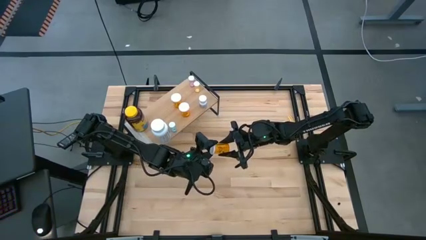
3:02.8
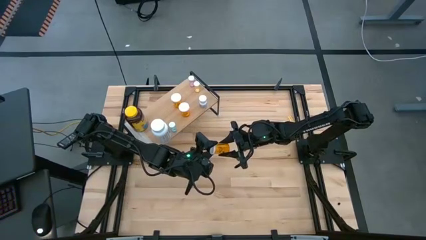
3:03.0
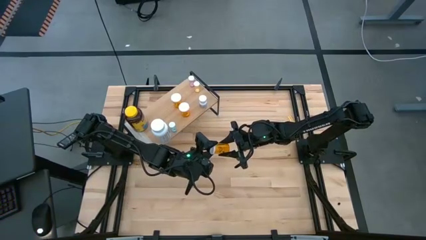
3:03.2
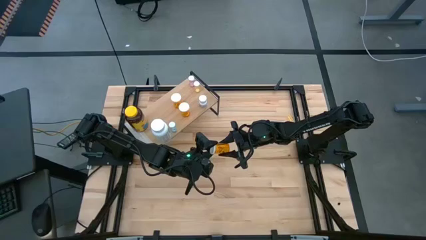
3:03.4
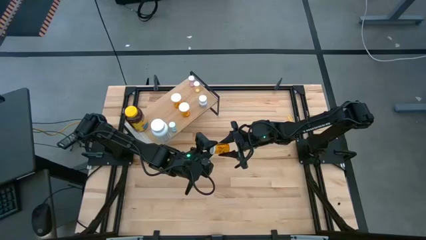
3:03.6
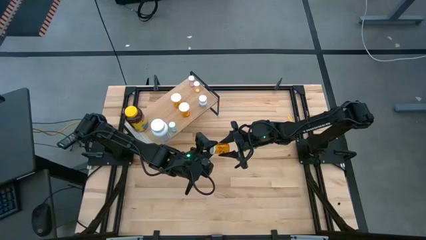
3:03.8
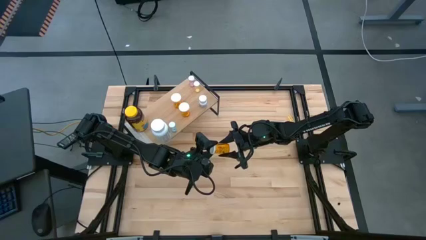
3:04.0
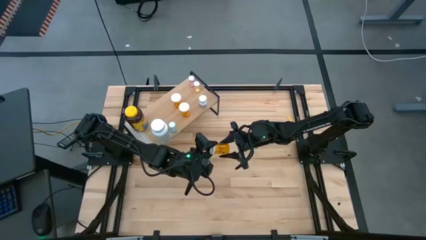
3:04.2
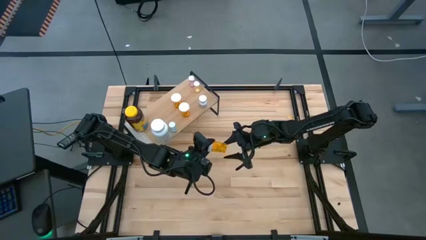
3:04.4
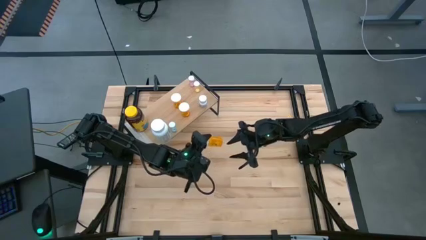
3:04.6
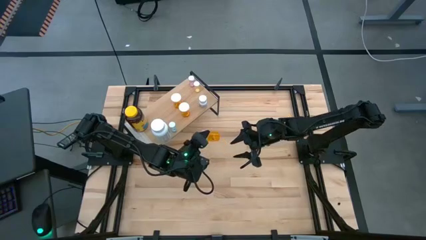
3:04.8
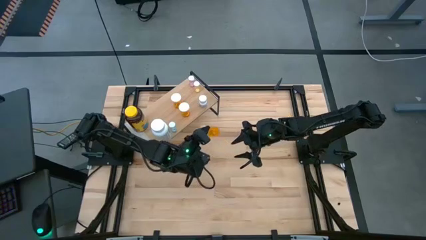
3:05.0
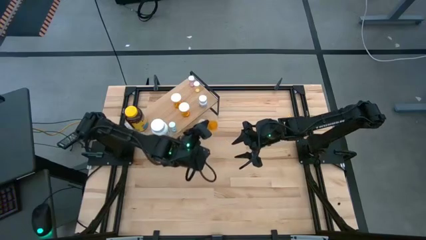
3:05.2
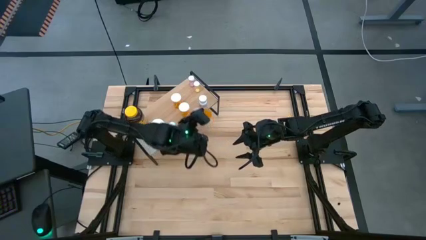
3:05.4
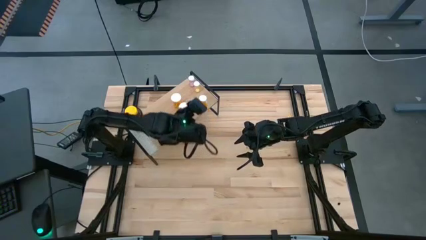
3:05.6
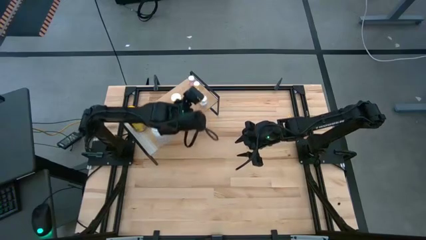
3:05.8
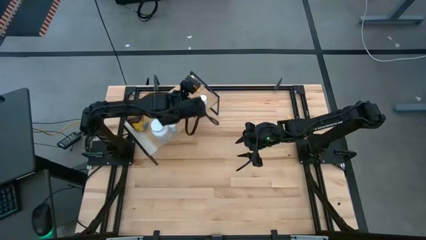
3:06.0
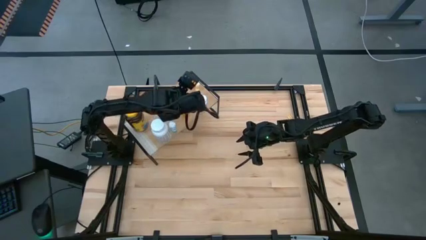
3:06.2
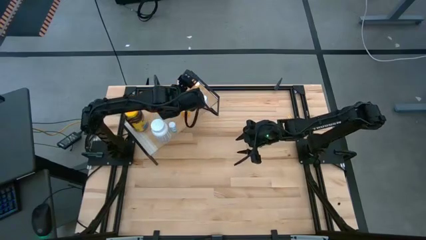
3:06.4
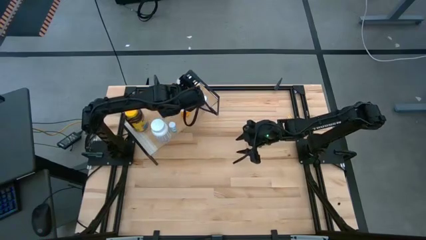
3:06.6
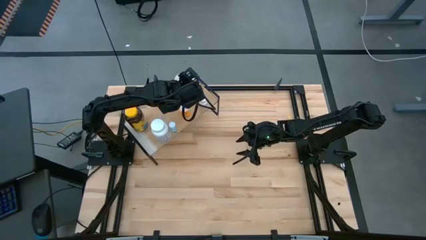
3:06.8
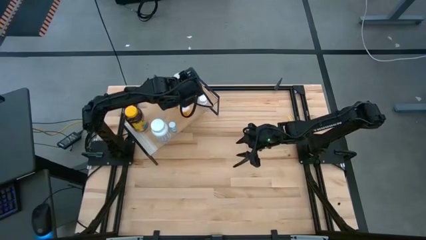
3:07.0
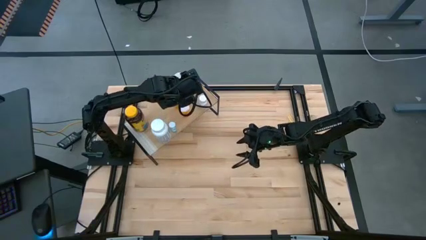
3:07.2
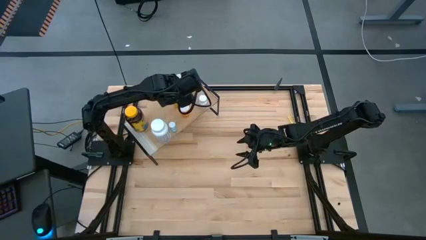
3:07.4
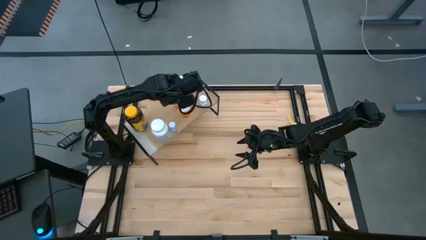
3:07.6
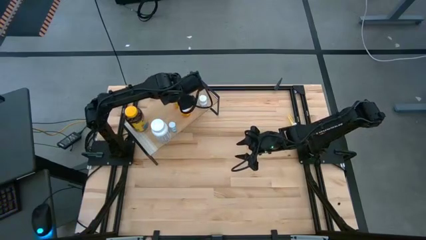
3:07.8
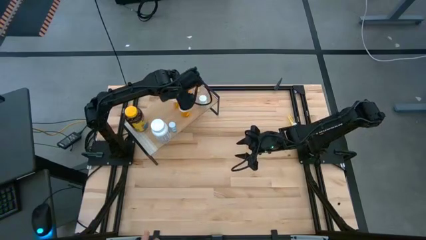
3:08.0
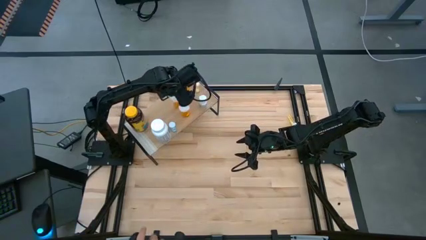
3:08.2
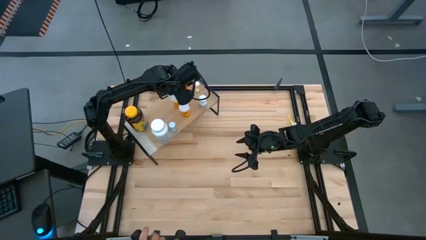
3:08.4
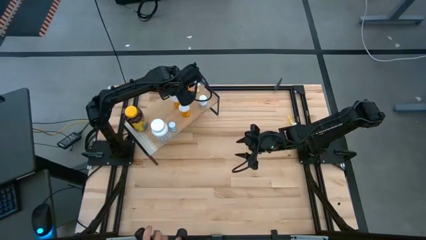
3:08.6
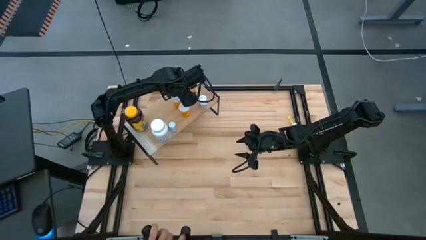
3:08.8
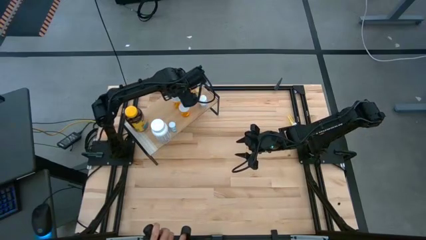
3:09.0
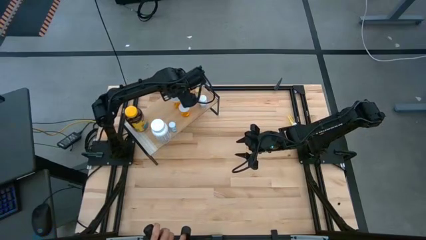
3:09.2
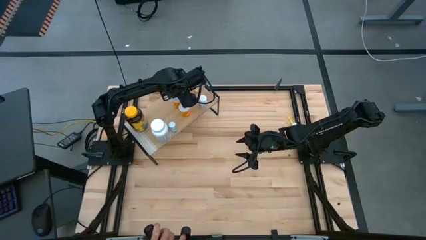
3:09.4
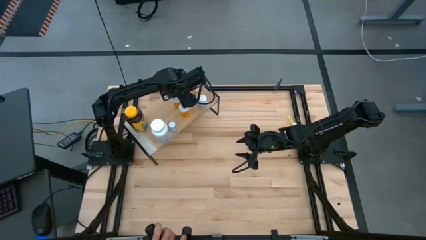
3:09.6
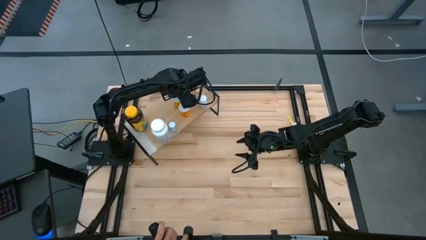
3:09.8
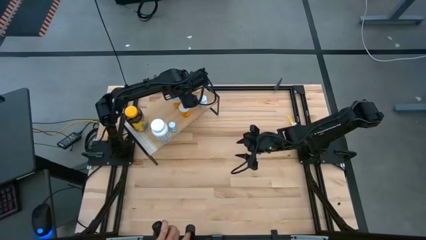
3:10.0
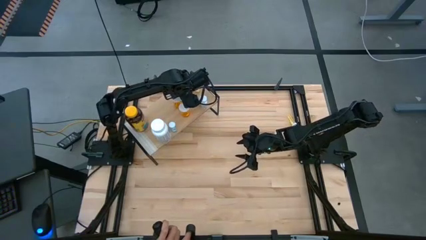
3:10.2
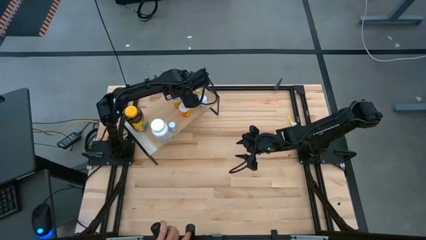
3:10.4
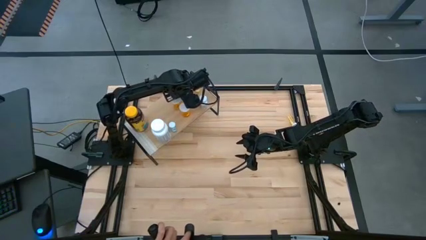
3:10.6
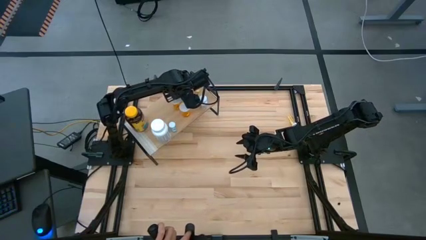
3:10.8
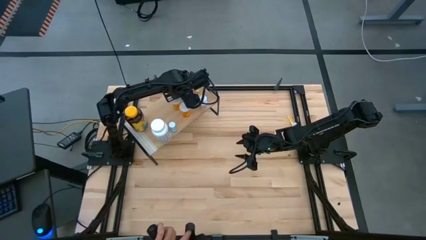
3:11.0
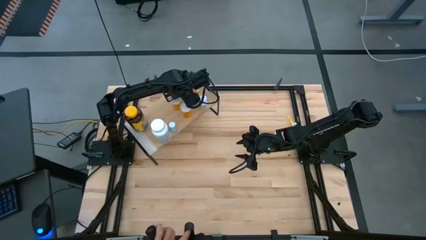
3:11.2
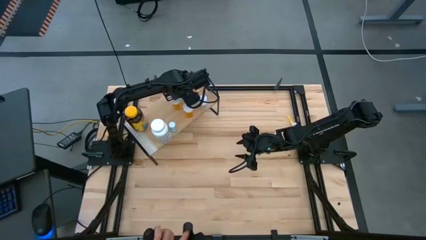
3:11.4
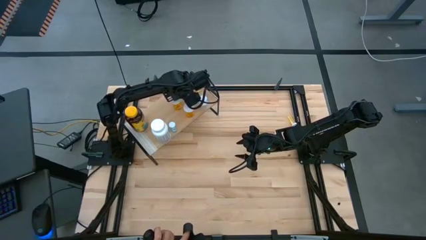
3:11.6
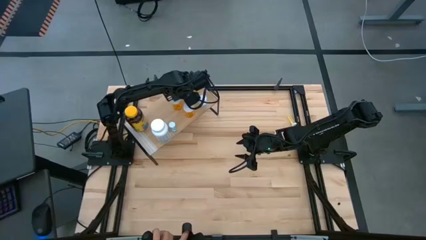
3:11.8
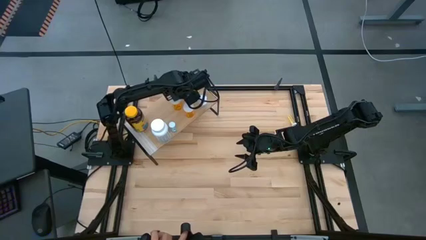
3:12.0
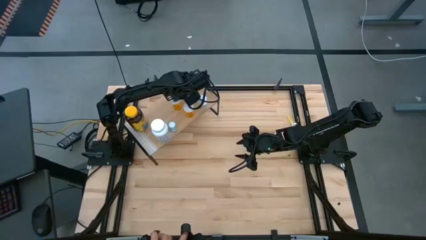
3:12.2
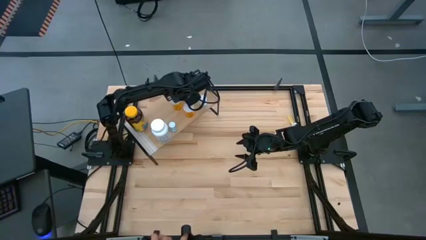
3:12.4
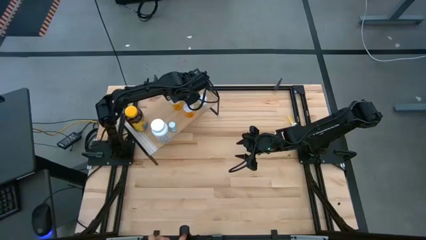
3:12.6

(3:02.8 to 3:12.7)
Task: Pick and place medicine bottles onto shelf by color
Put the orange pill bottle on the shelf
